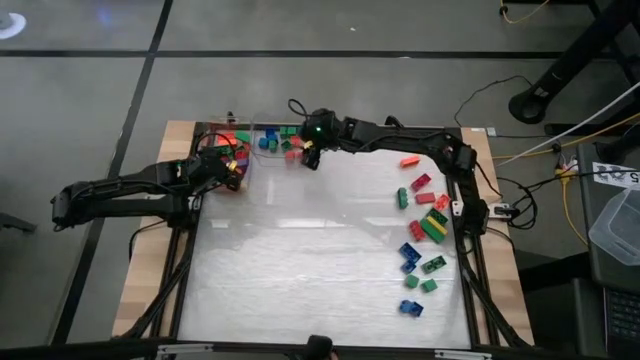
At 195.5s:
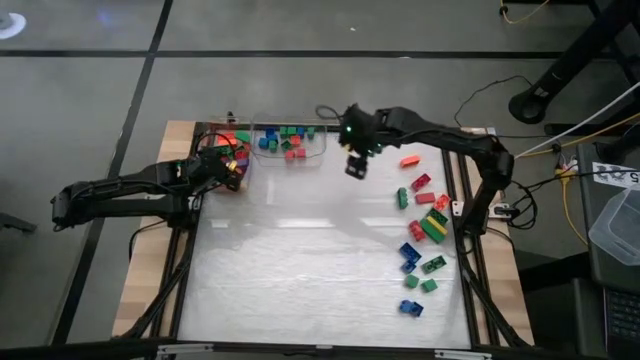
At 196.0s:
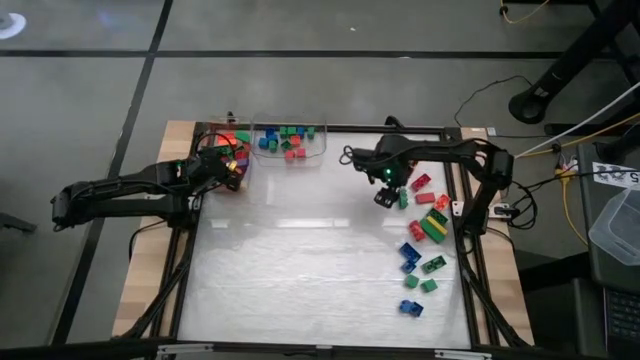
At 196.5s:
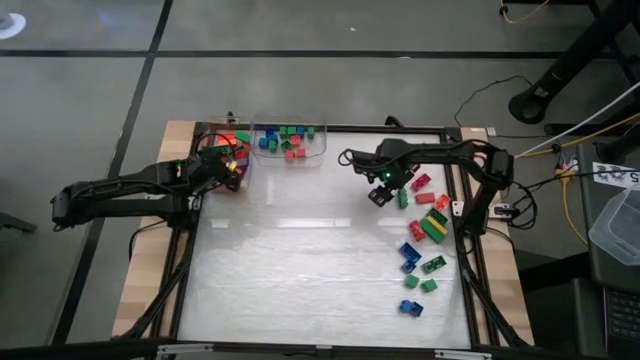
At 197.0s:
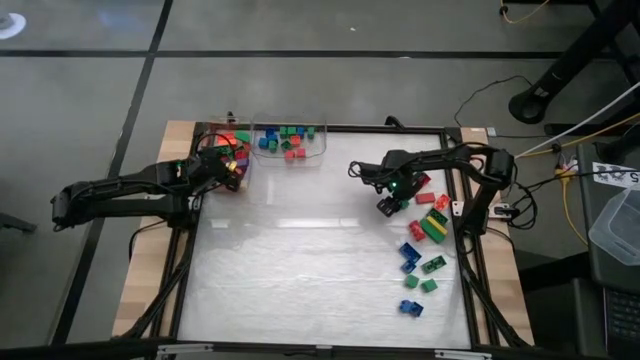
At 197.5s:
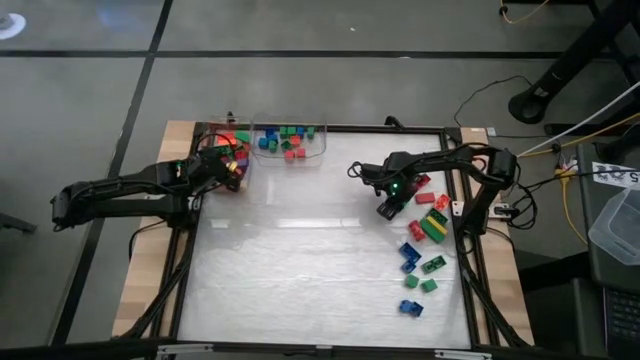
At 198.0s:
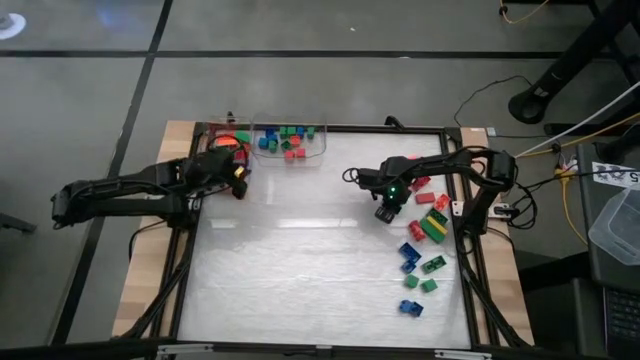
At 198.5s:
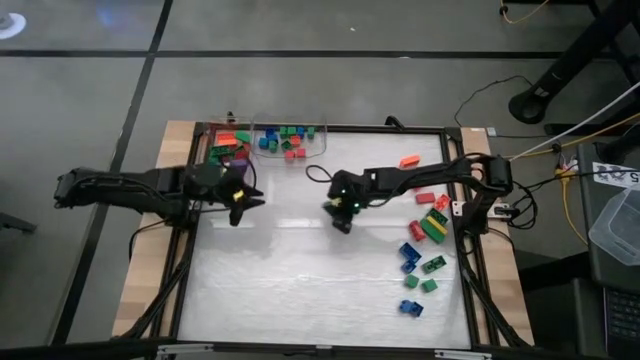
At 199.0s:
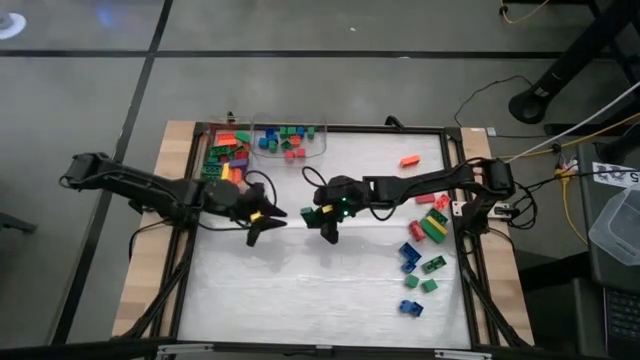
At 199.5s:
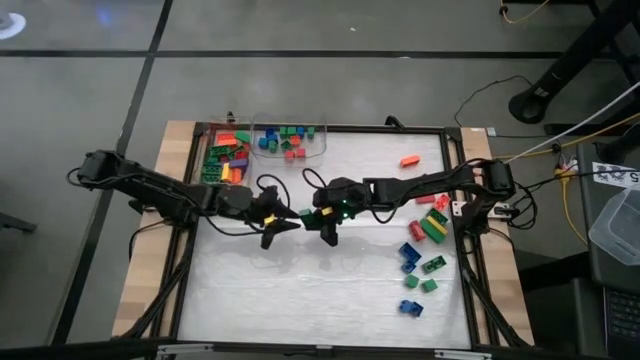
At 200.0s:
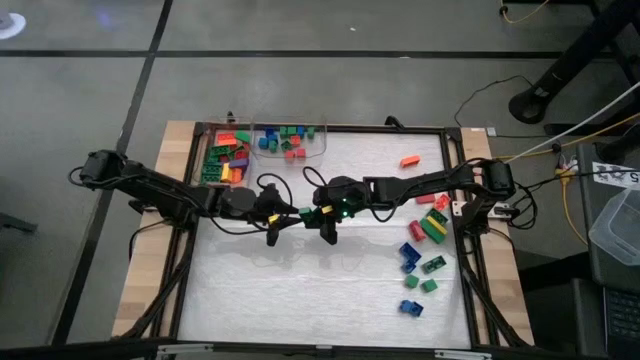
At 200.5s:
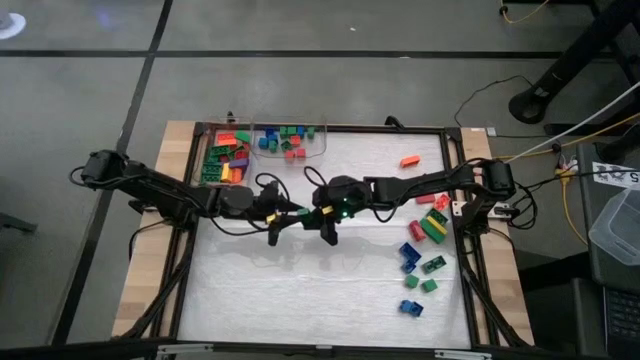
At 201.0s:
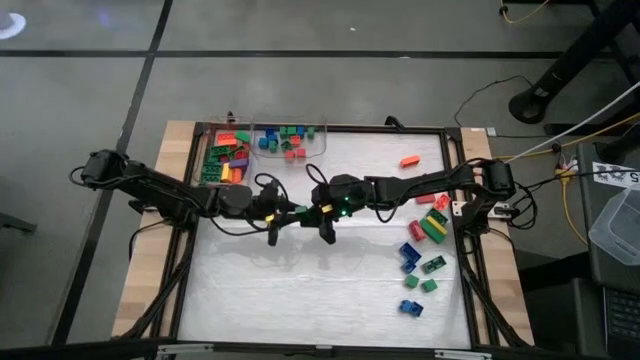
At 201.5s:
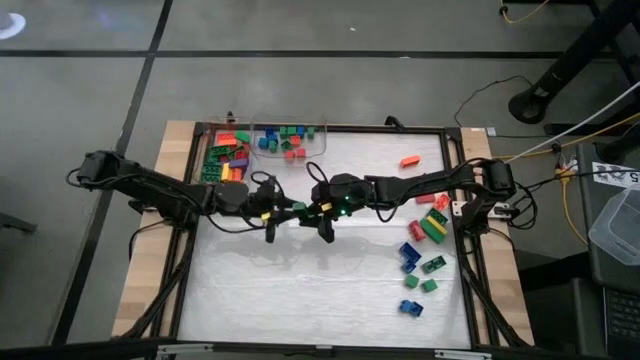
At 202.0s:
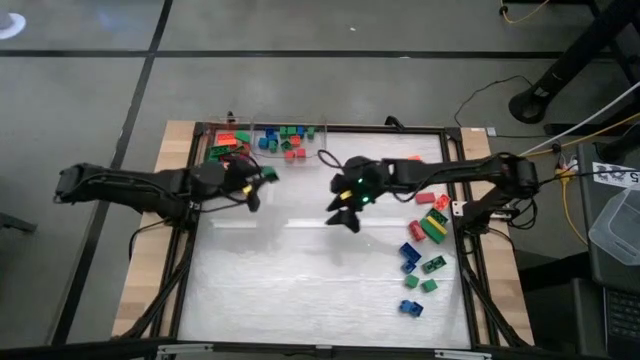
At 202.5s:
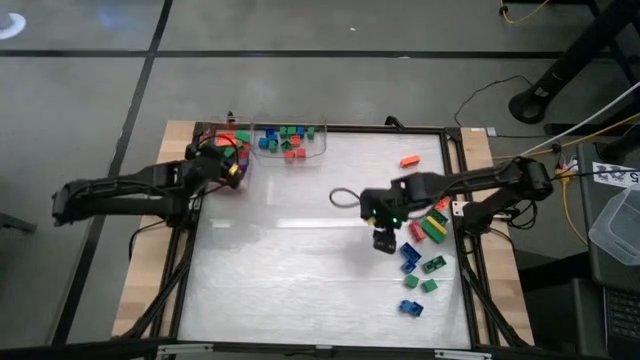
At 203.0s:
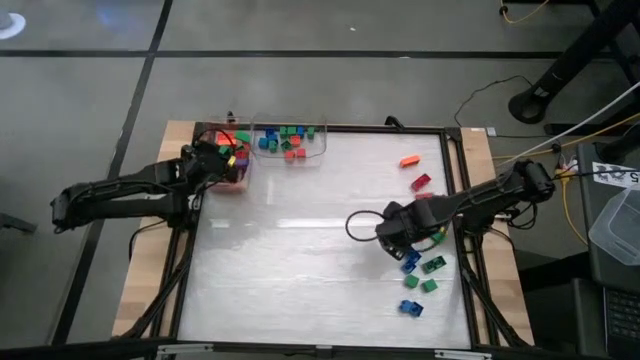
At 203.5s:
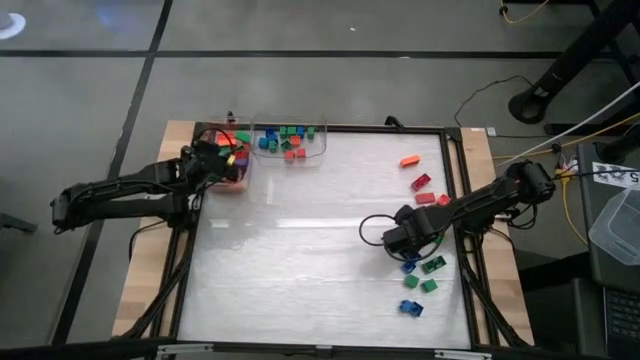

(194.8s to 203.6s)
Task: Sort blocks by size
Put the large green game piece into the left transparent bin

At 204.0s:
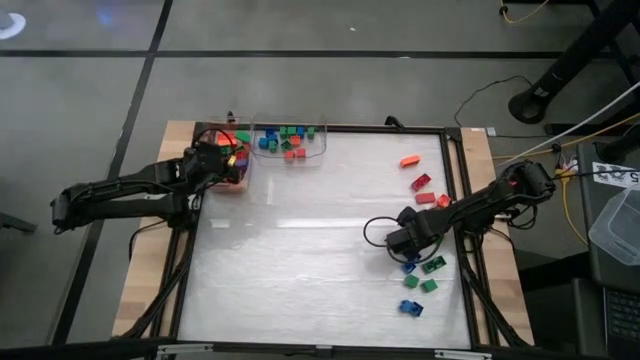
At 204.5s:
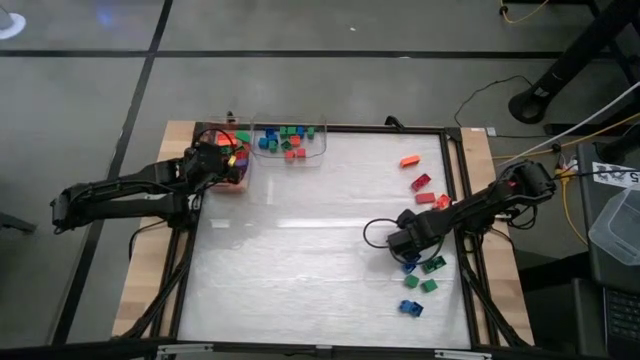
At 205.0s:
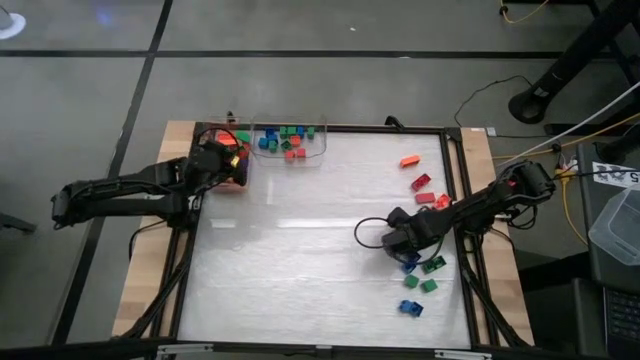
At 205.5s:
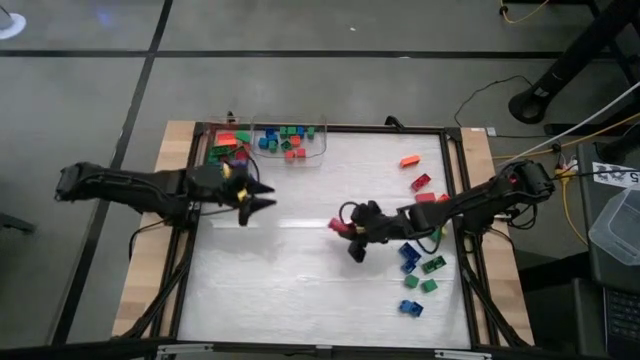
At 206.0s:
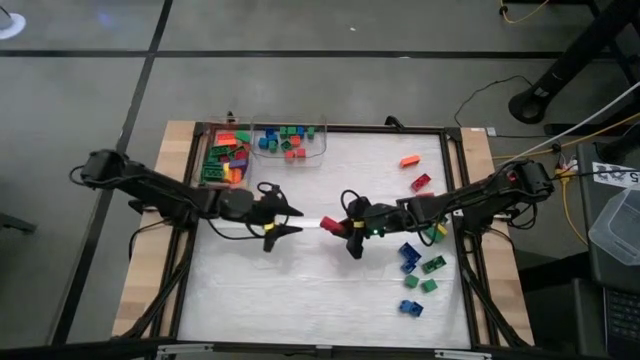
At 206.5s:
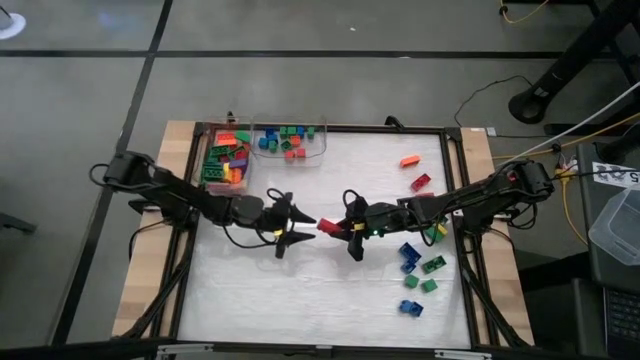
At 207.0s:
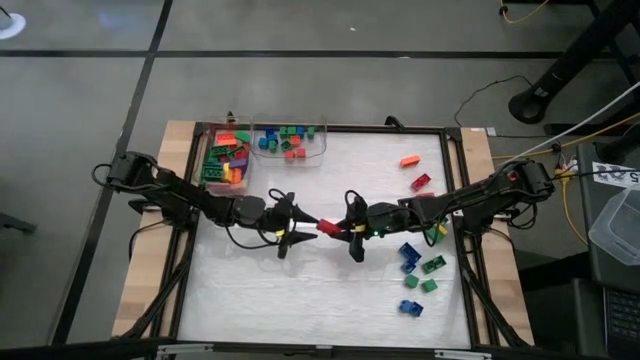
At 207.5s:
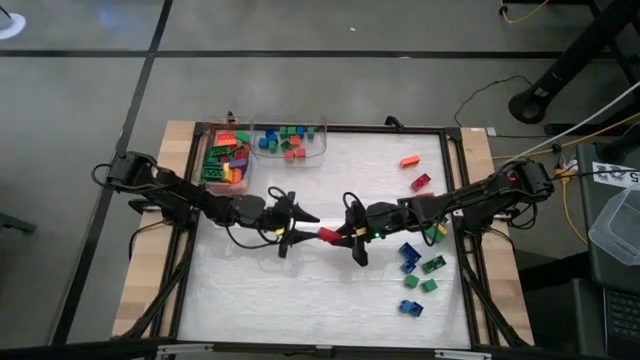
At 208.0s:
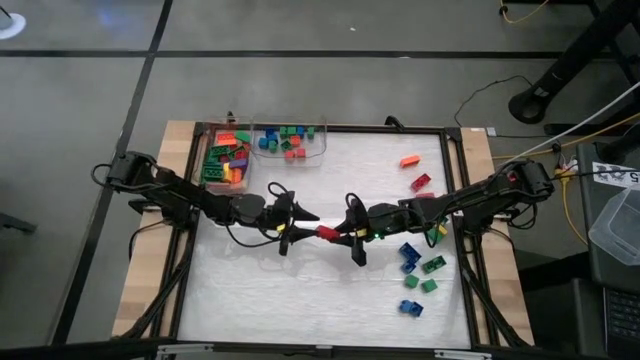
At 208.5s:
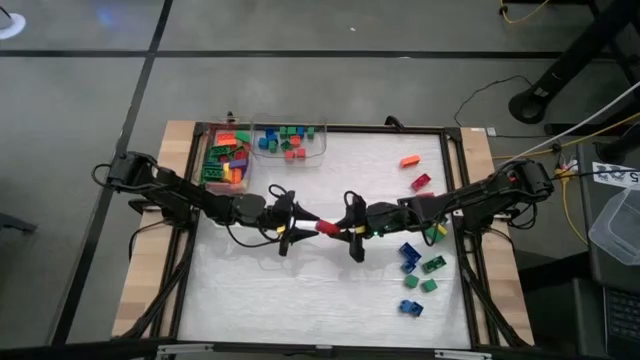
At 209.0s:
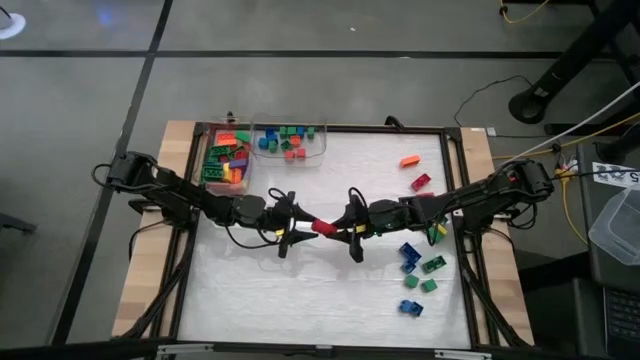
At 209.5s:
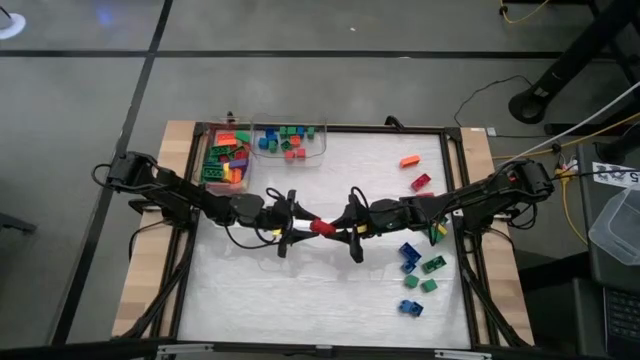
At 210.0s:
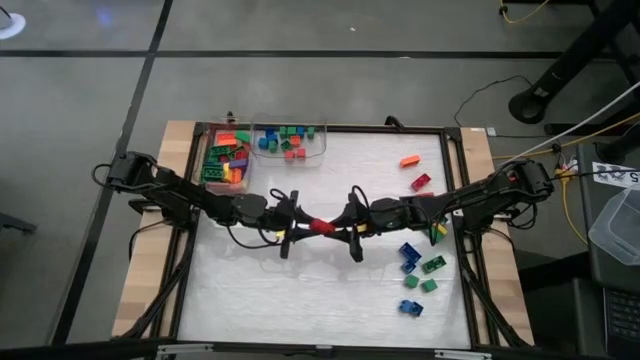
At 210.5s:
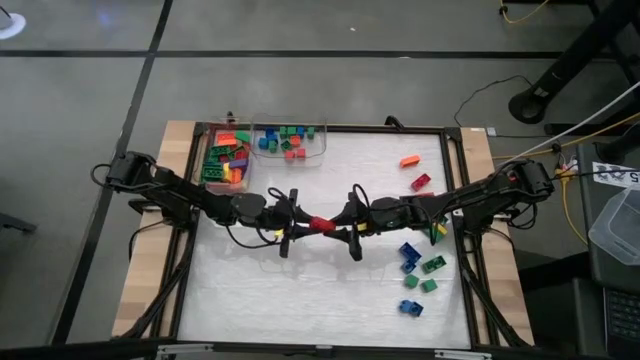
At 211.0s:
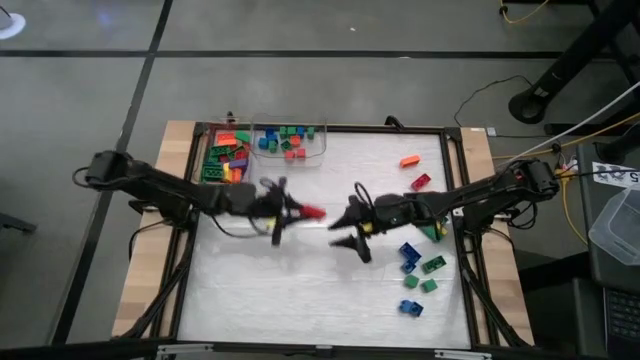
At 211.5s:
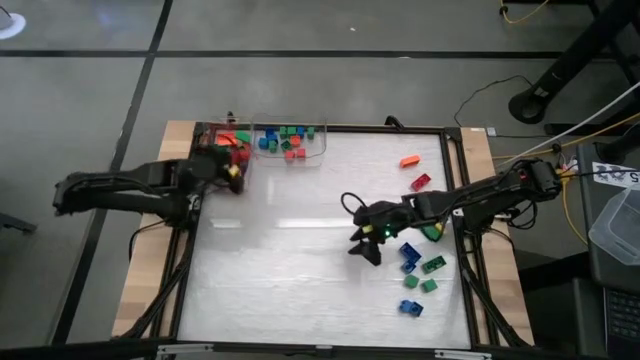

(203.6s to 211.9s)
Put the large red game piece into the left transparent bin

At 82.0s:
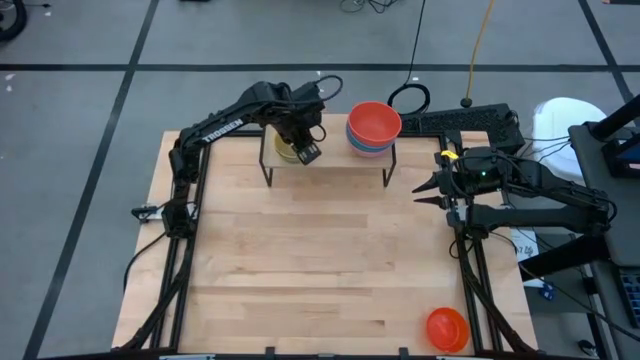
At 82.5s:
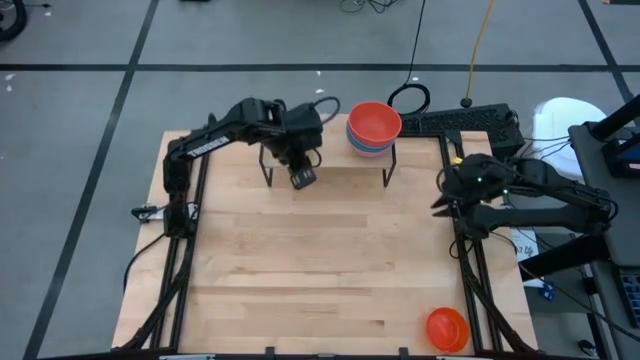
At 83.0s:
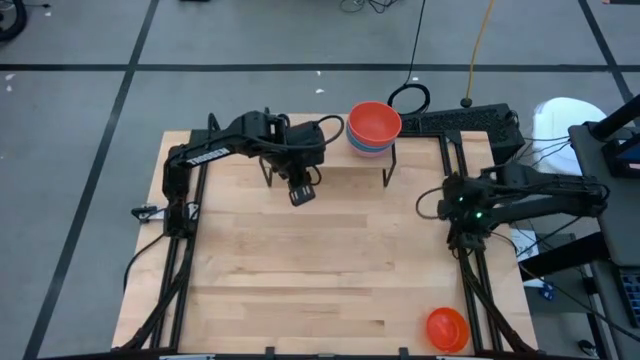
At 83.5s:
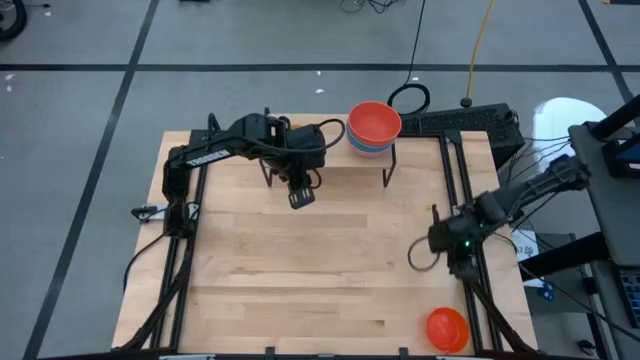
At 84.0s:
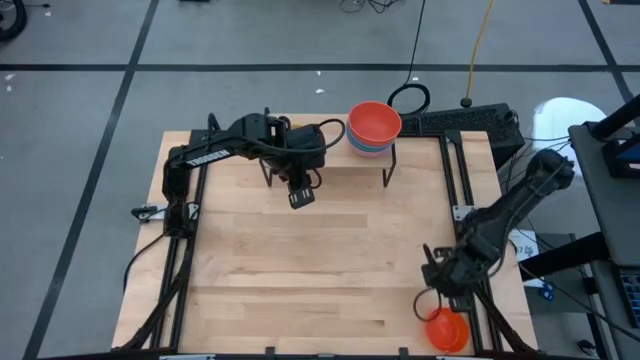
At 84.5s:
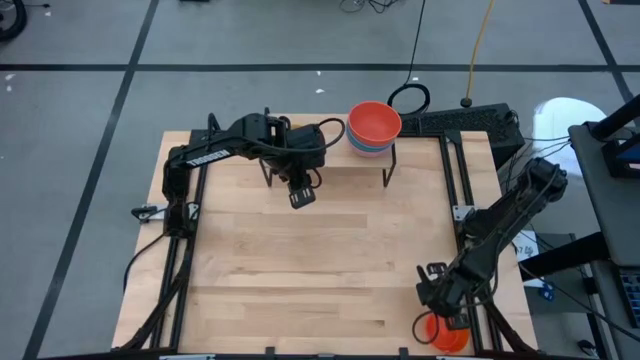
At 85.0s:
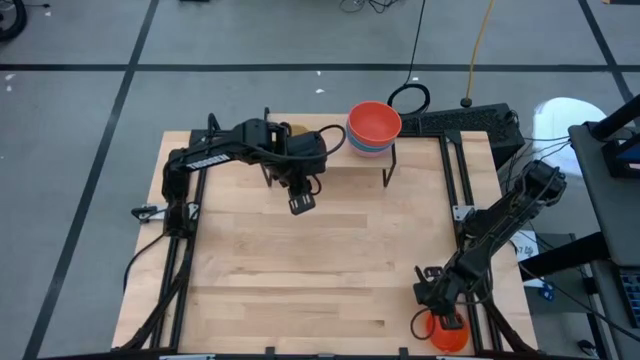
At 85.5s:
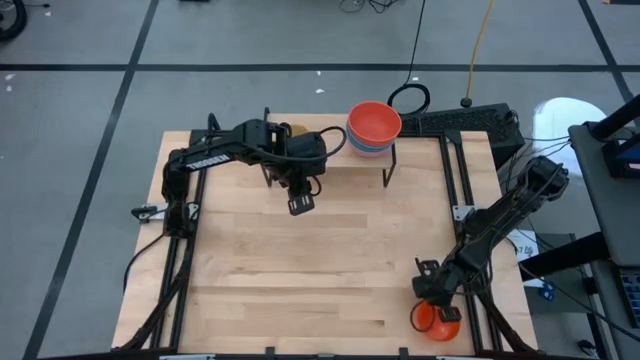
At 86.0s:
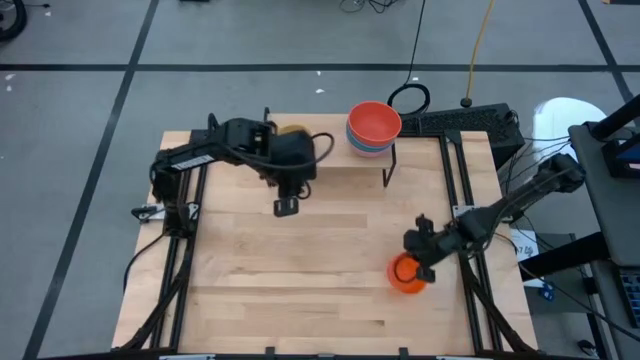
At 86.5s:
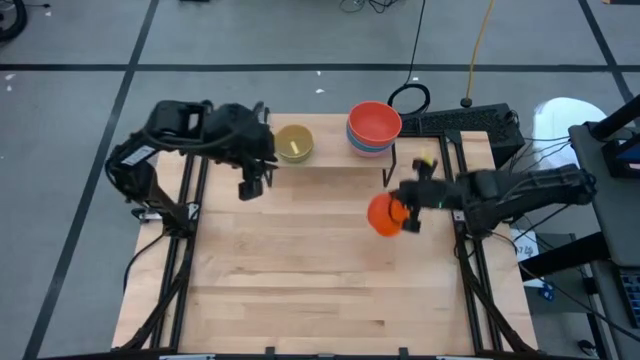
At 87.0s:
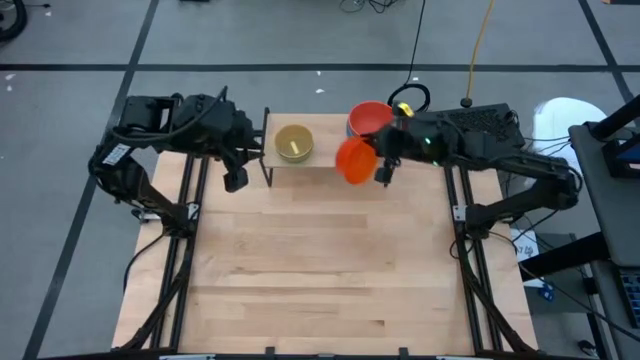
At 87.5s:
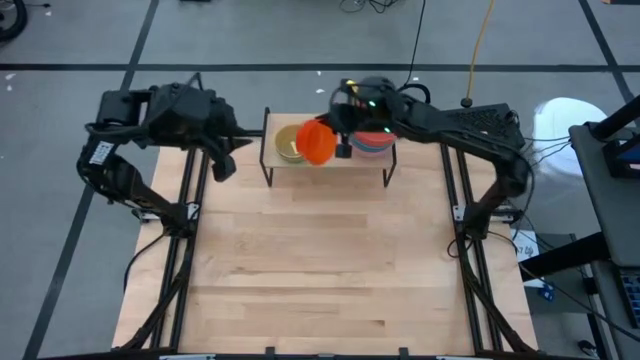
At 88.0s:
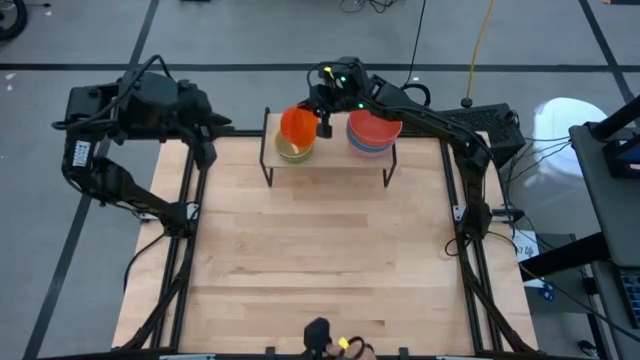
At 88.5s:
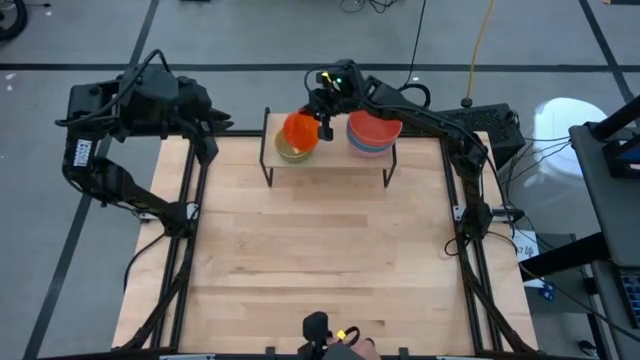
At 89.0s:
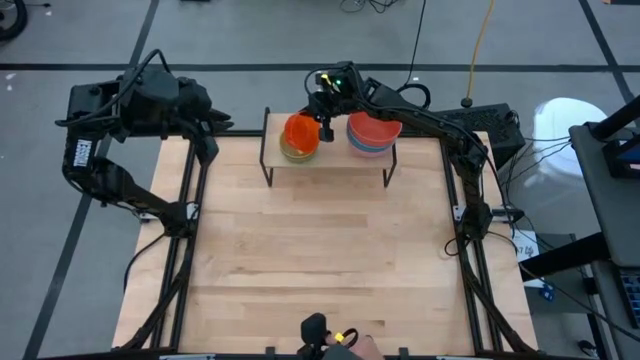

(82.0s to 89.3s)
Task: Place and stack bowls onto a shelf
Stack the light orange bowl on top of the light yellow bowl on the shelf
